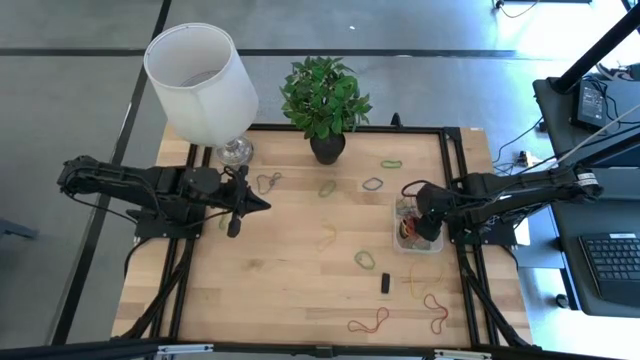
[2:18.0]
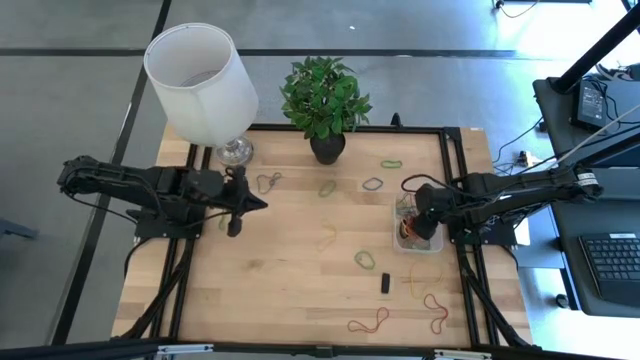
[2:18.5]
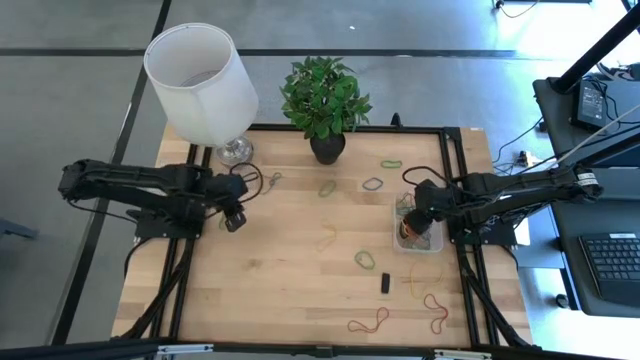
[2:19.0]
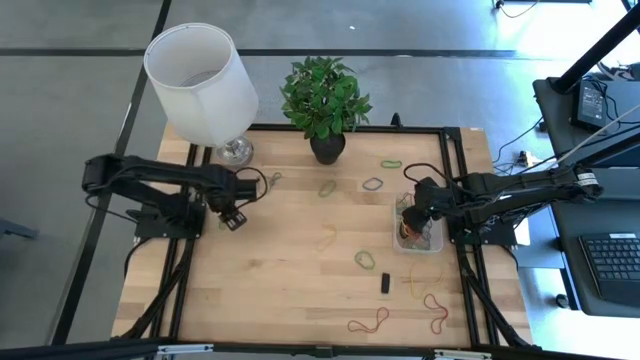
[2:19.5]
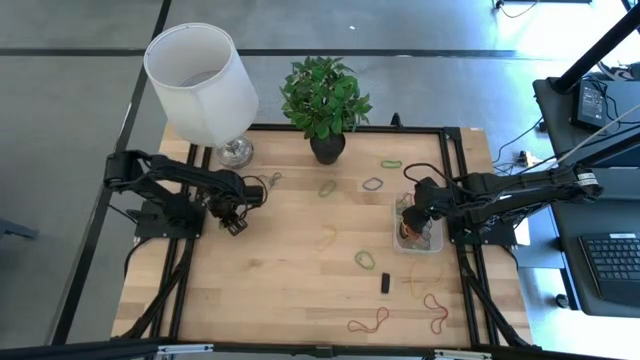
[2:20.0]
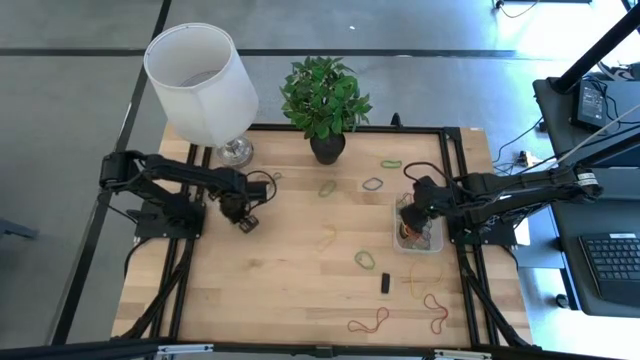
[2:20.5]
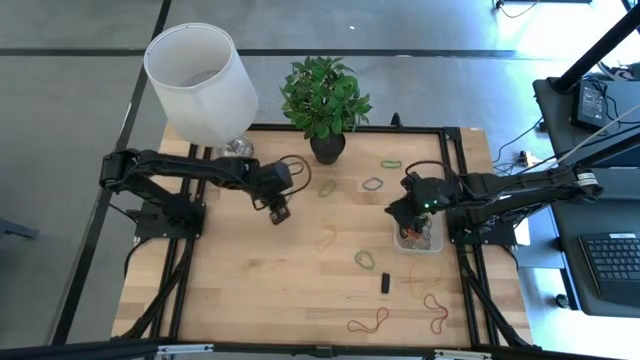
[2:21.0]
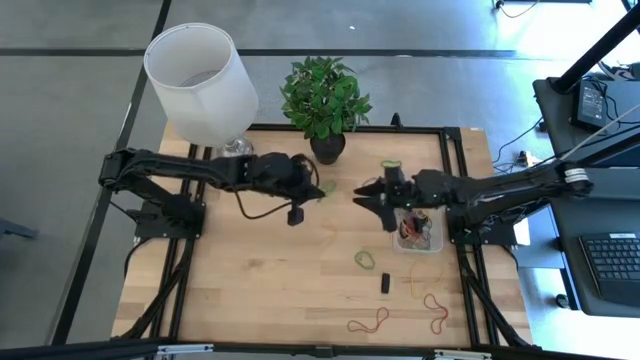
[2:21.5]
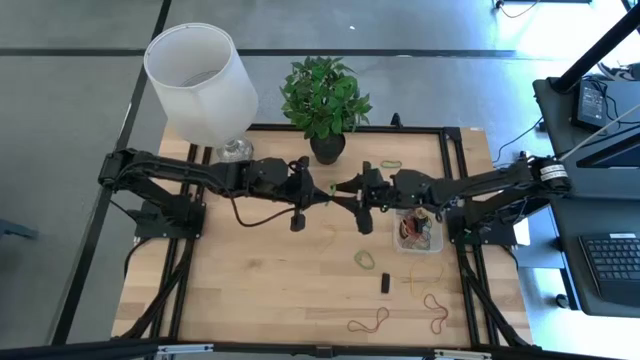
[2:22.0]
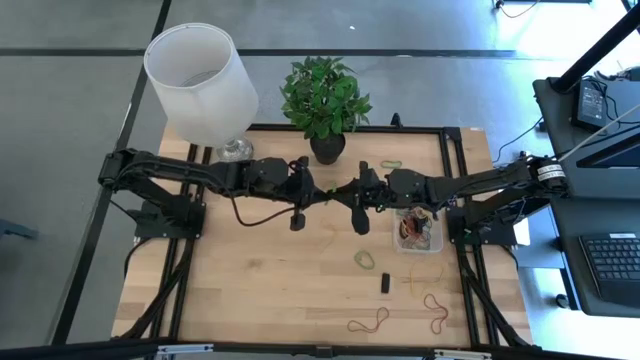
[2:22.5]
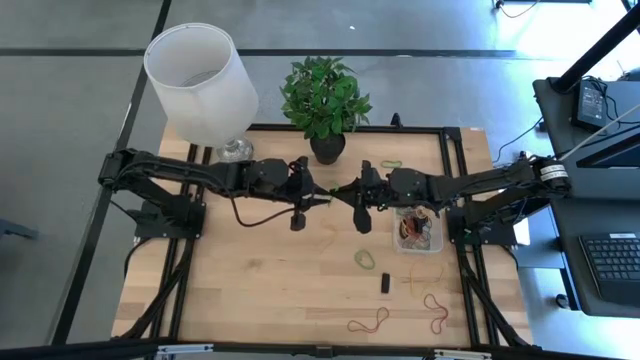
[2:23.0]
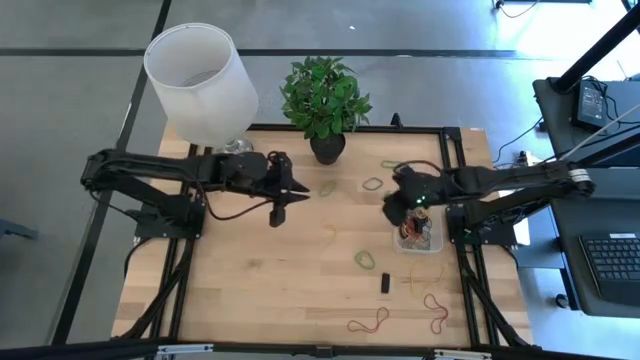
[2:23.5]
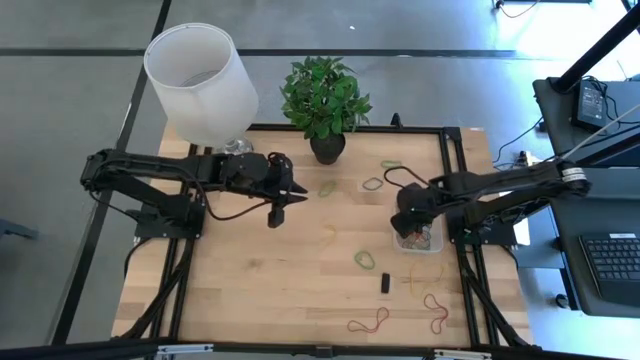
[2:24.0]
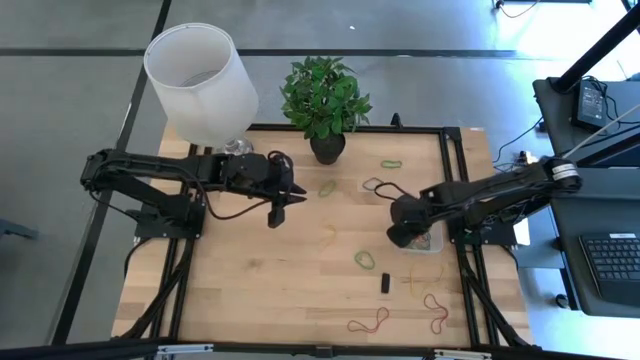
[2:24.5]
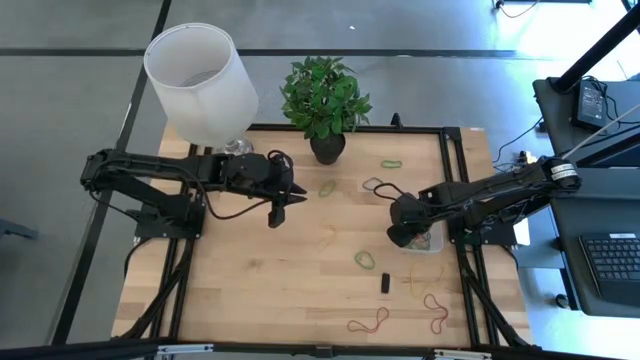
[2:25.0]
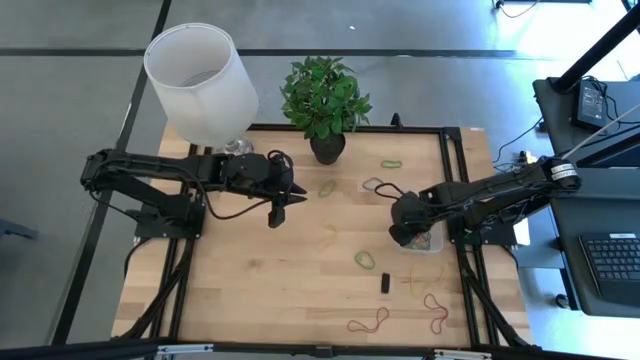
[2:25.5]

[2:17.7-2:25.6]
Task: Pick and place rubber bands into bin
Put the green rubber band into the transparent bin

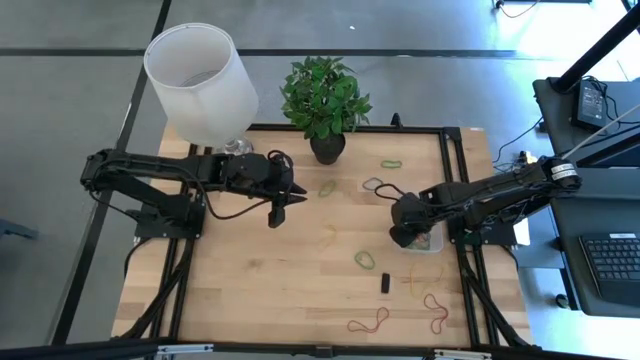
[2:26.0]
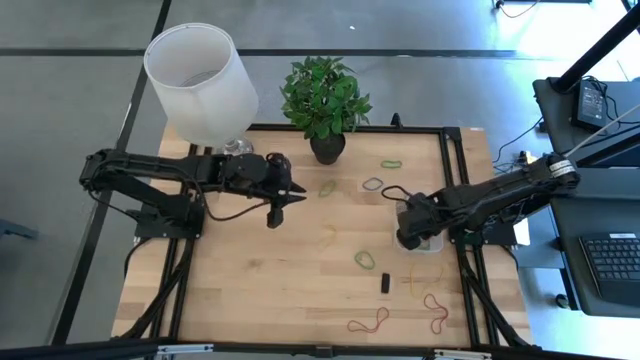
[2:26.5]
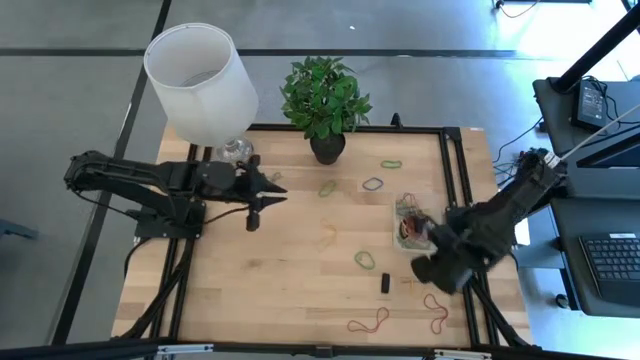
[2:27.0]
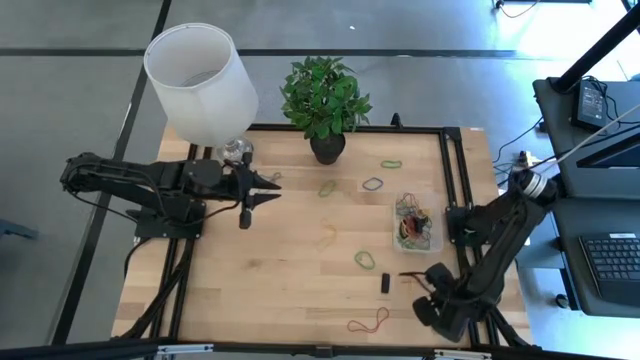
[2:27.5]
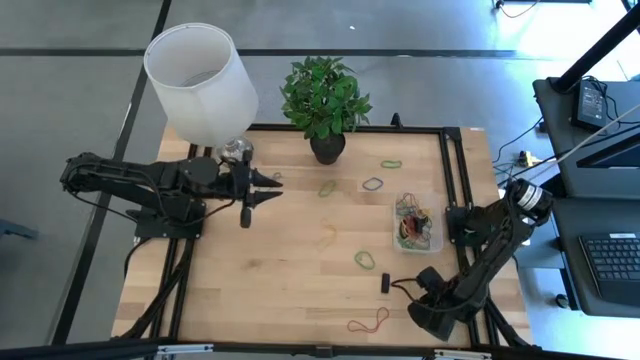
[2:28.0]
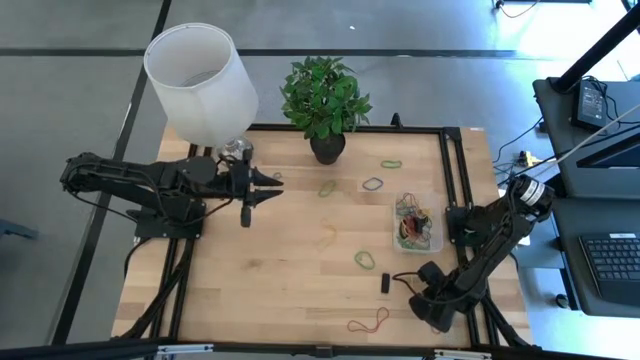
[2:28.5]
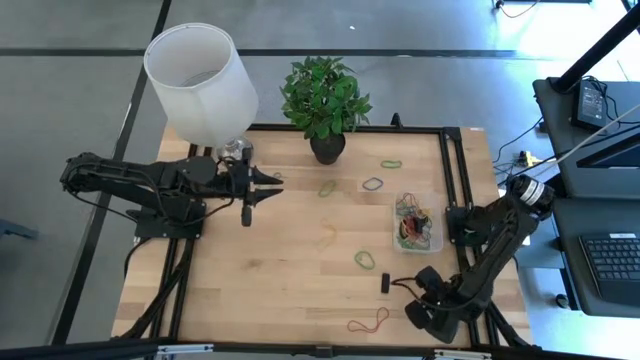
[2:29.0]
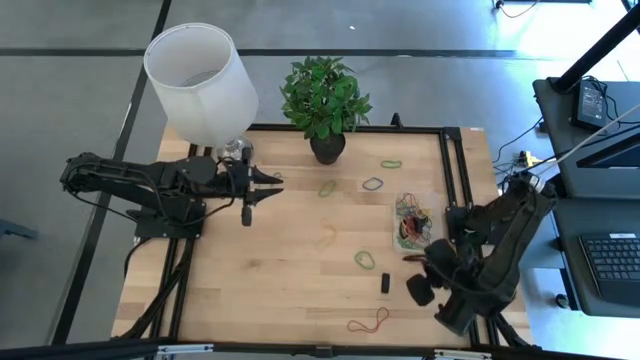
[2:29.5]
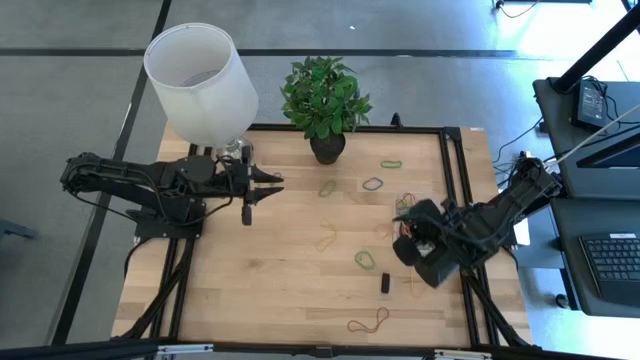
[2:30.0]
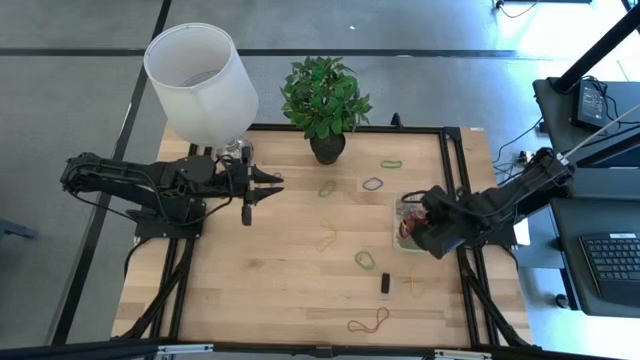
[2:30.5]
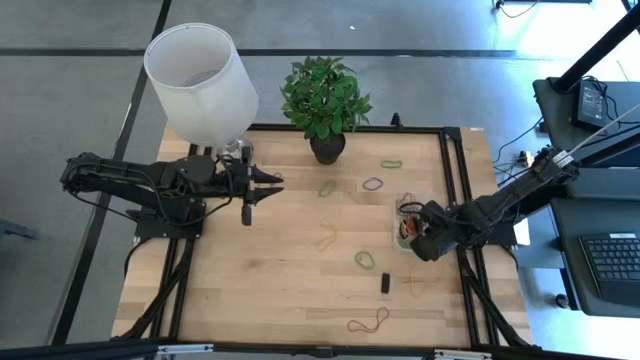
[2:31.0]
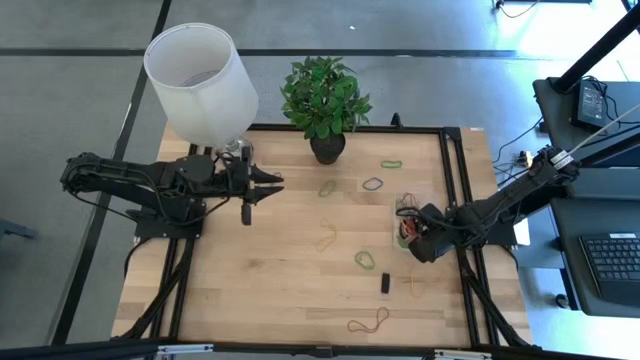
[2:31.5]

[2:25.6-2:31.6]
Put the red rubber band into the transparent bin

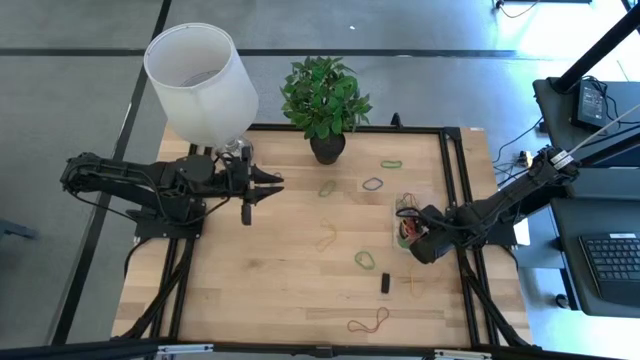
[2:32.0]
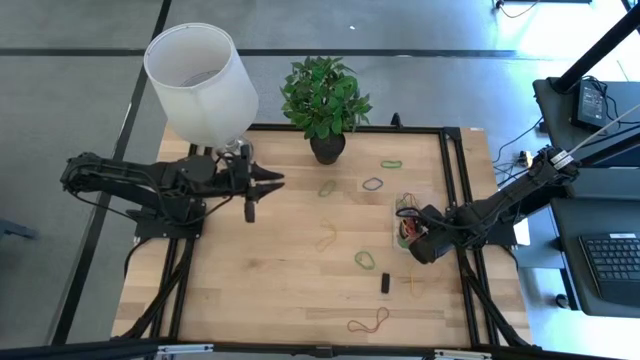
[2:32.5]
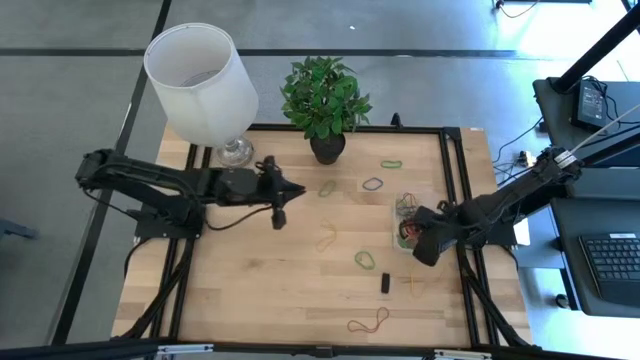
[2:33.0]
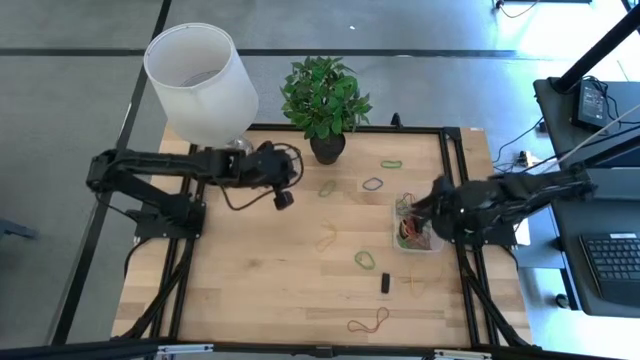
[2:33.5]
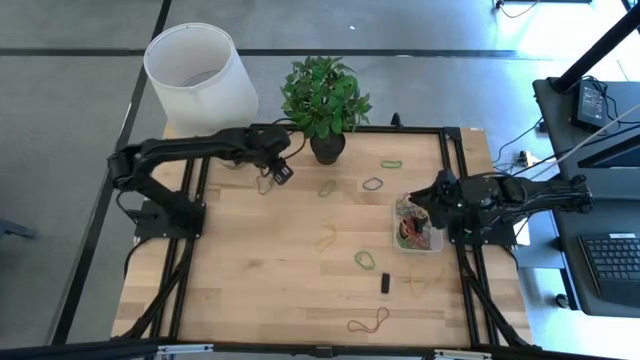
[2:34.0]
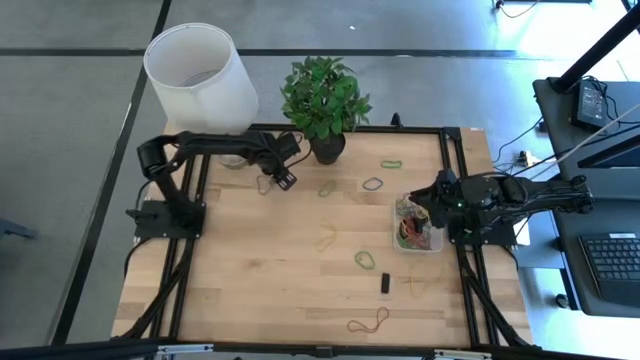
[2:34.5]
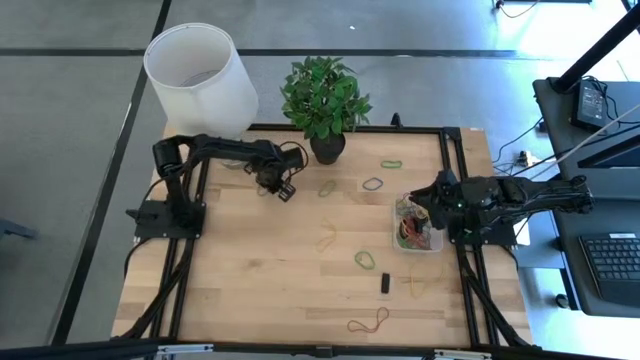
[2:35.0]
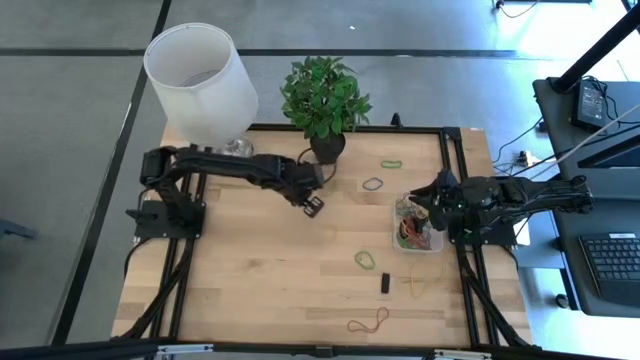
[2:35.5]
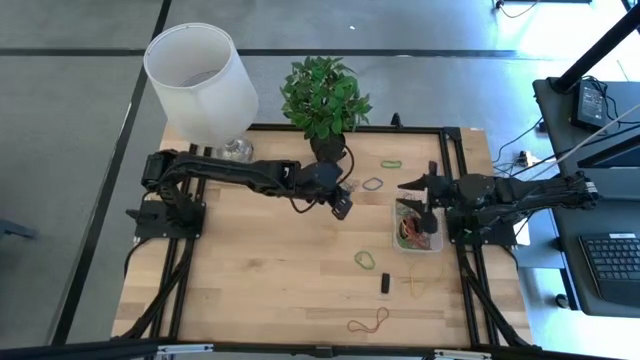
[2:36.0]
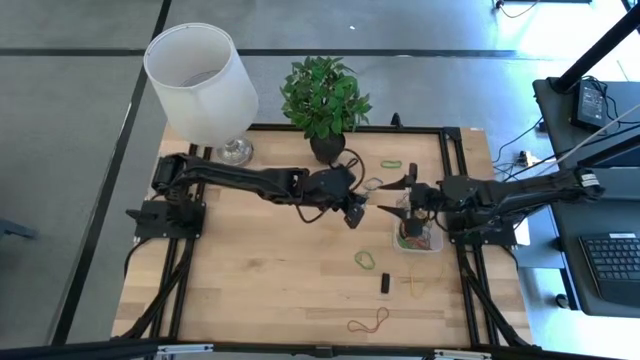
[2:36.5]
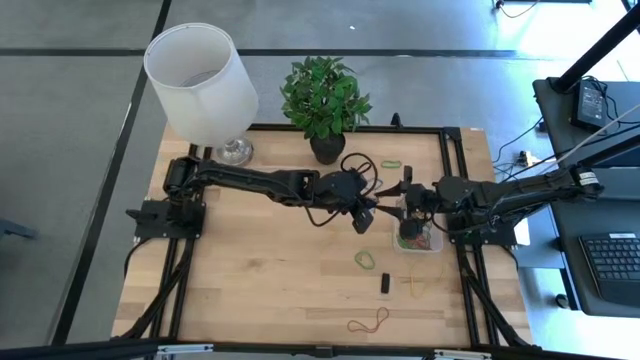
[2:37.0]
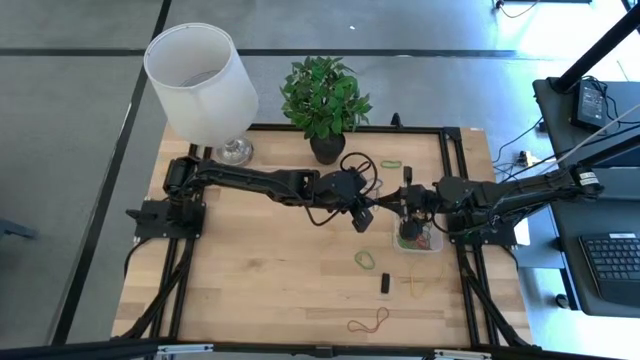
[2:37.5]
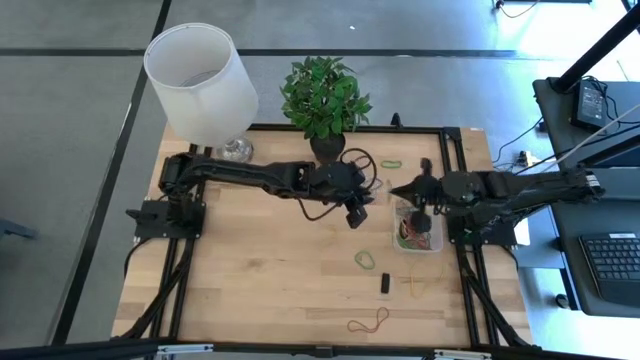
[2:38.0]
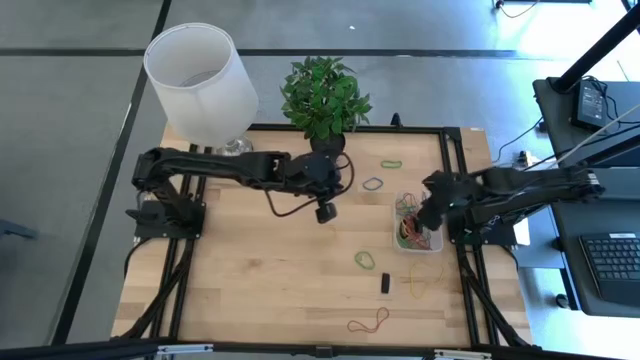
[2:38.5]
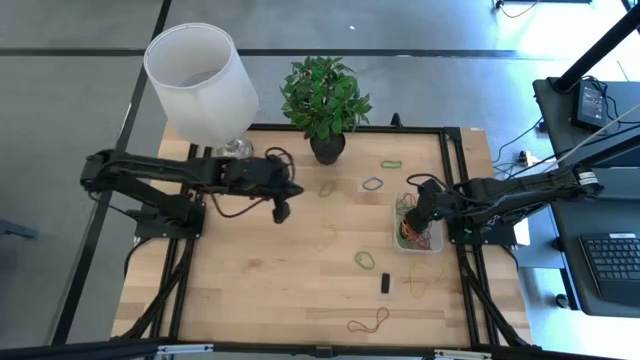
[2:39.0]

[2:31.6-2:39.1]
Put the blue rubber band into the transparent bin
